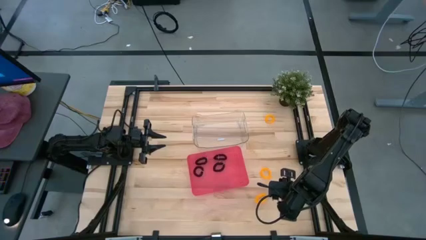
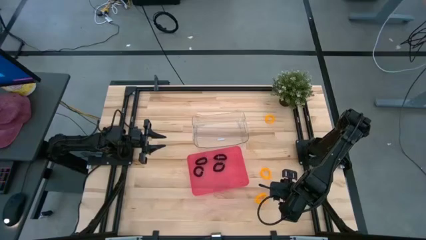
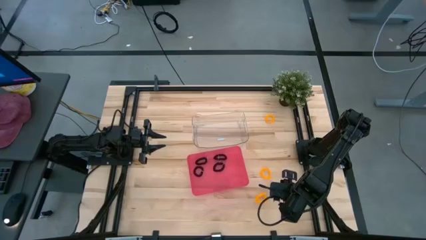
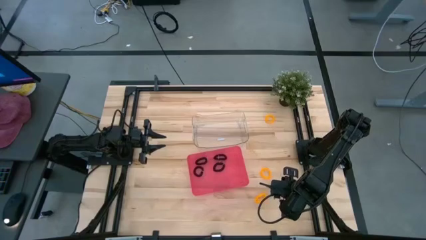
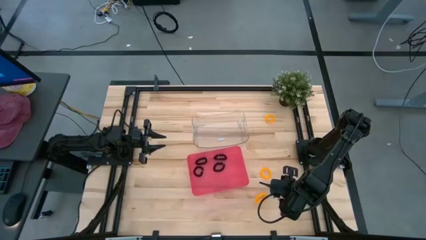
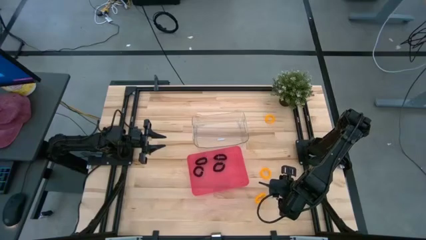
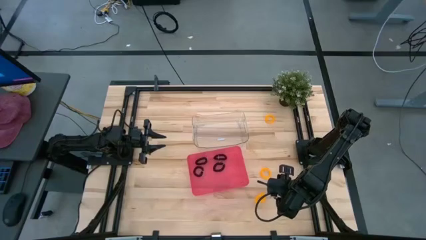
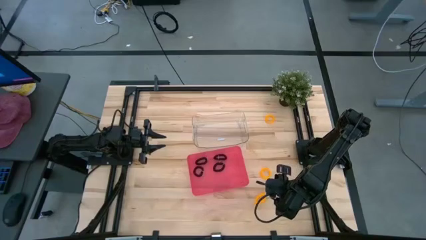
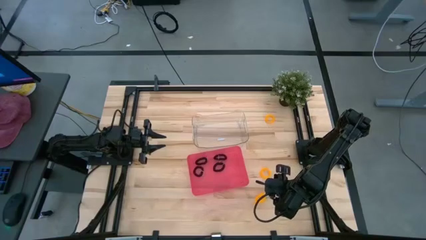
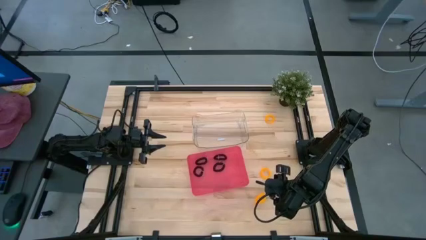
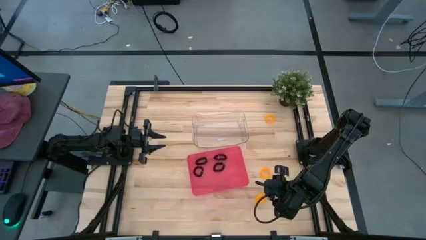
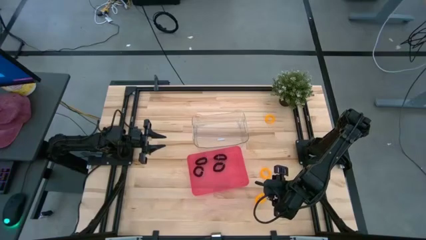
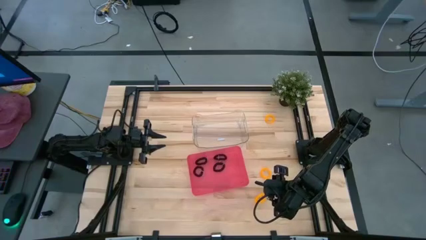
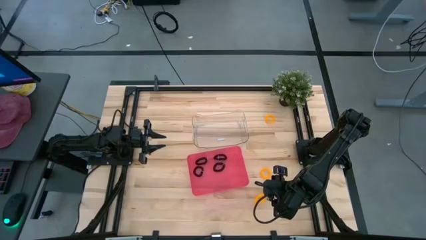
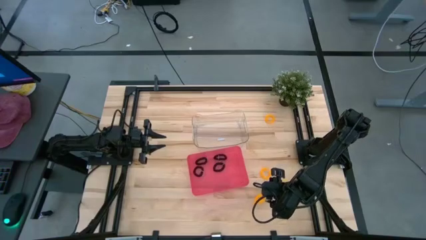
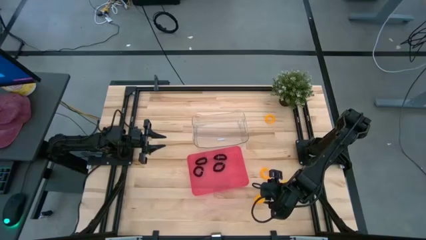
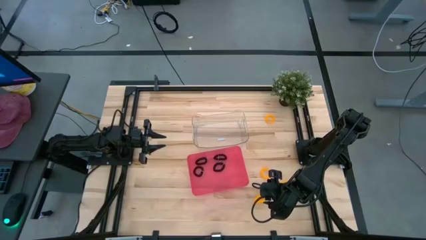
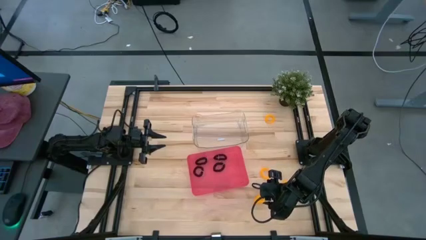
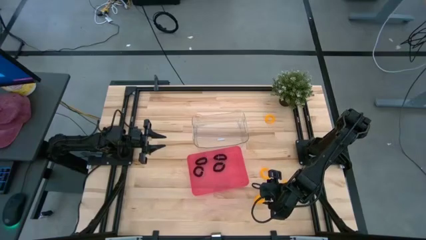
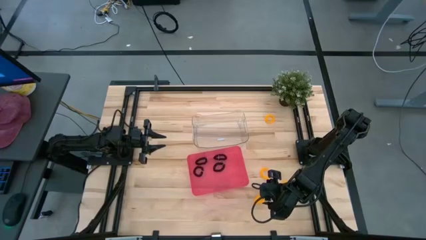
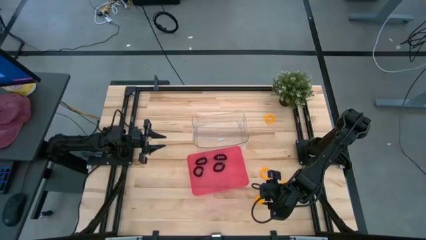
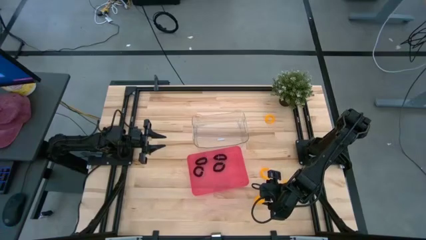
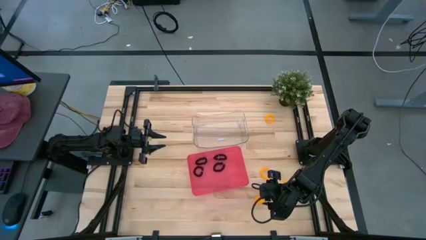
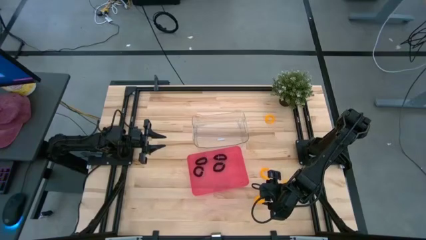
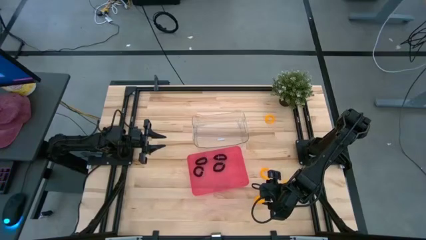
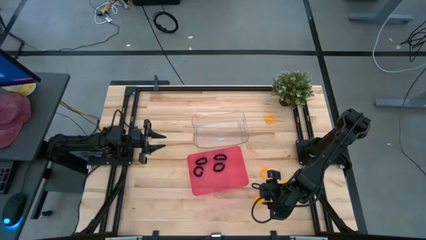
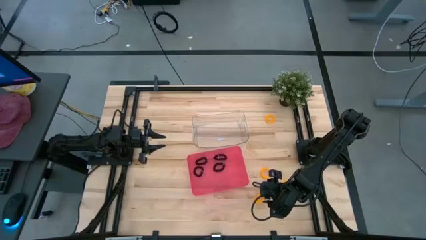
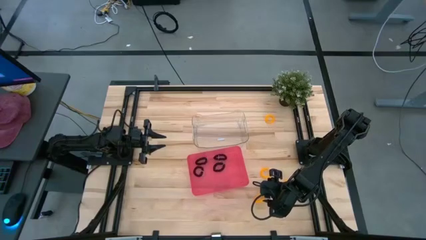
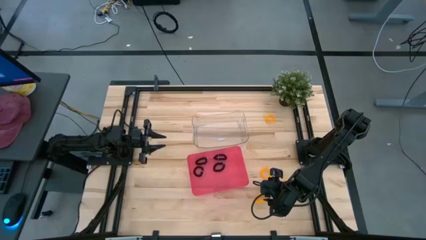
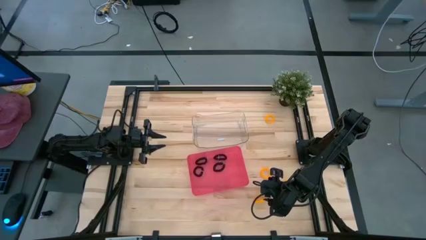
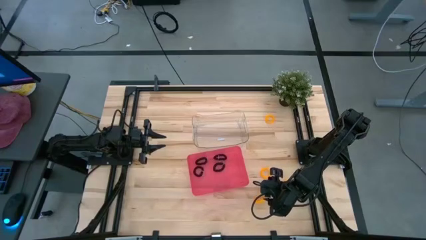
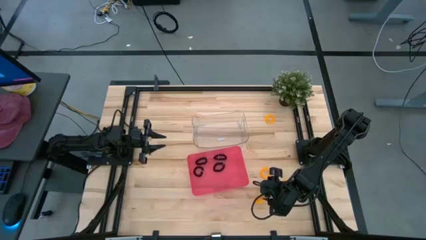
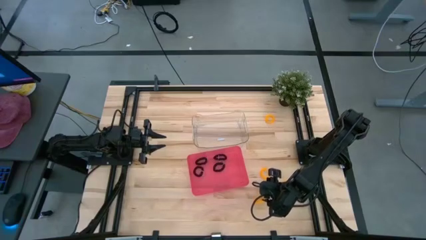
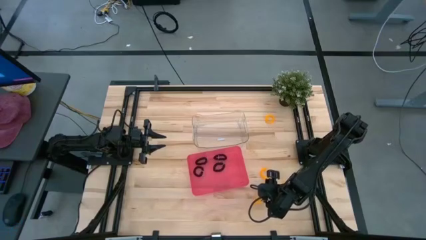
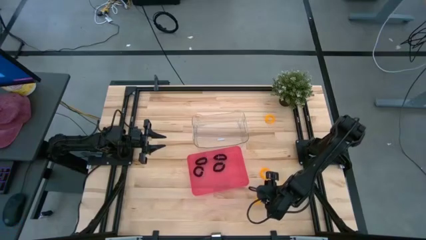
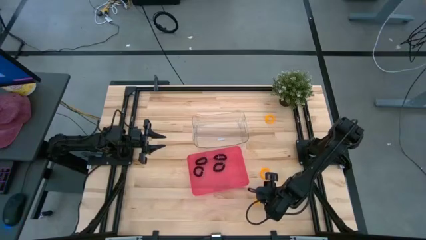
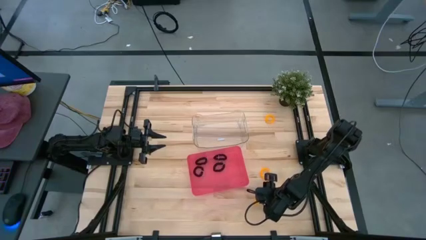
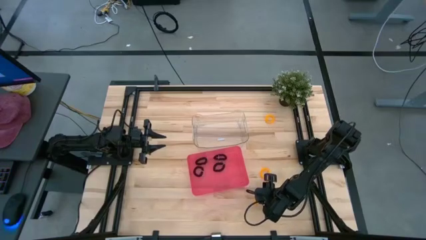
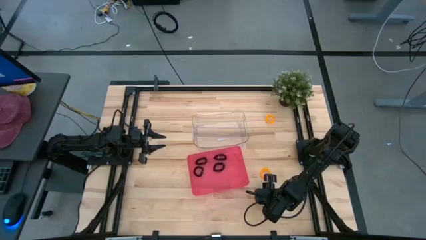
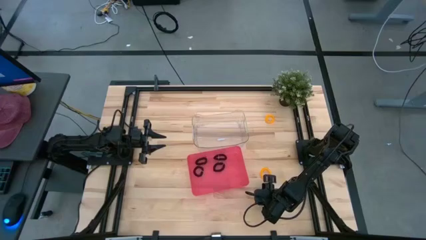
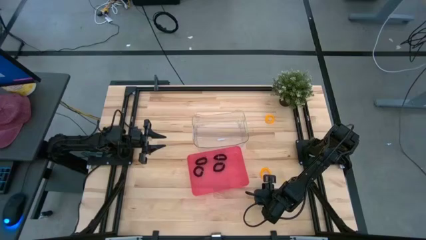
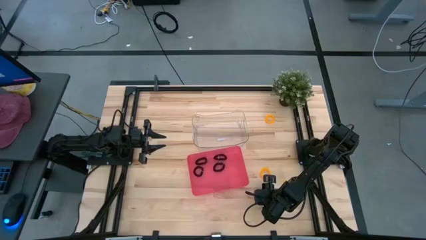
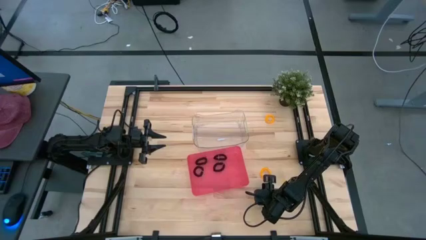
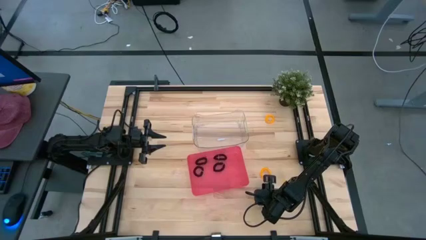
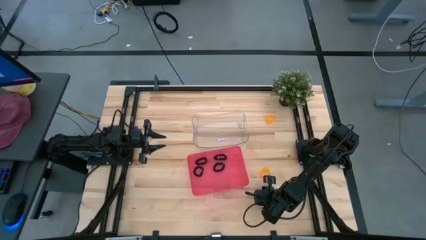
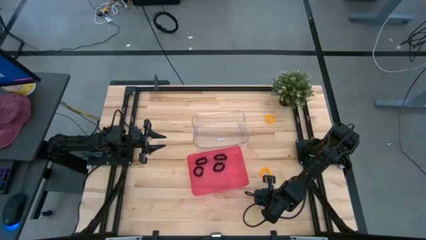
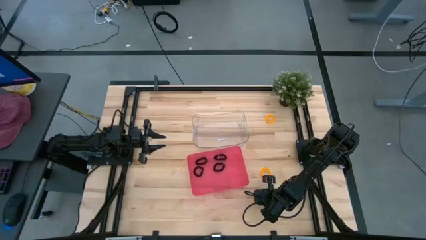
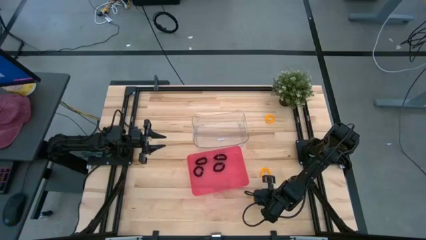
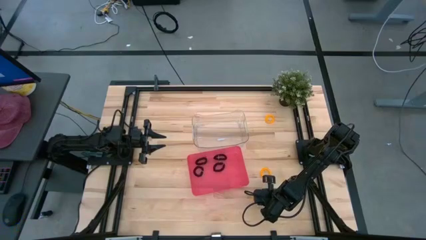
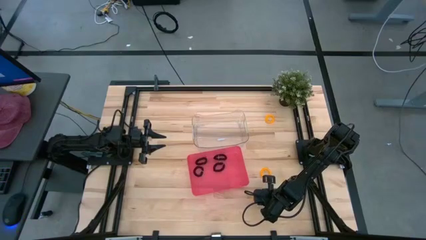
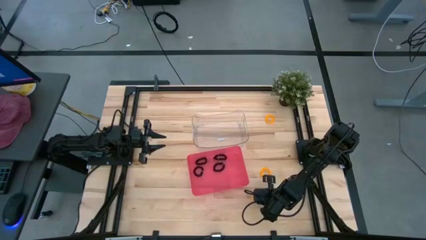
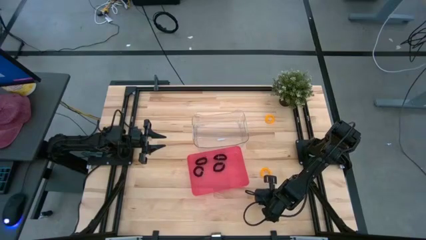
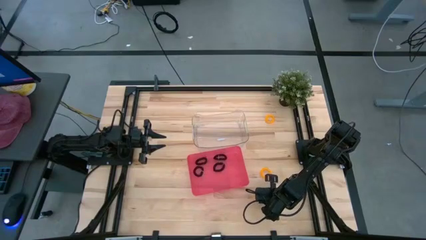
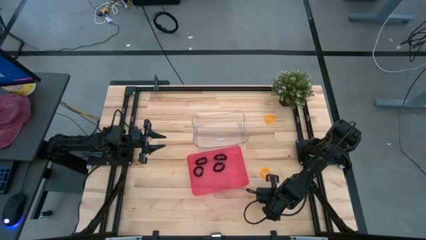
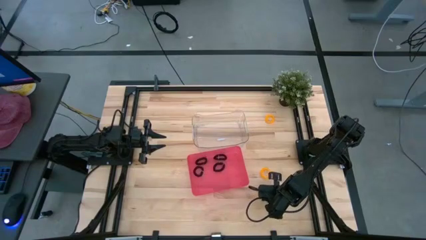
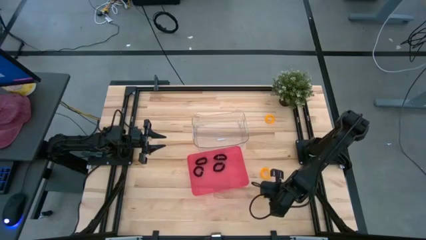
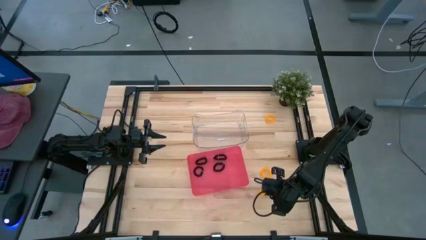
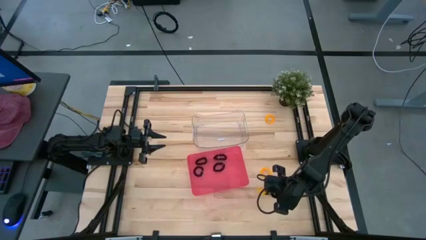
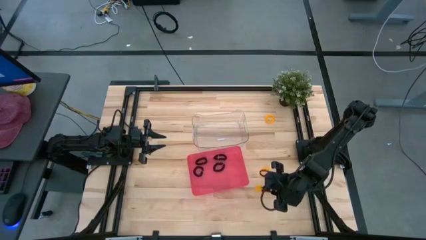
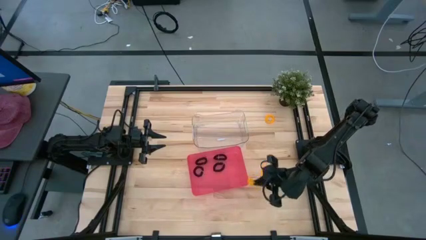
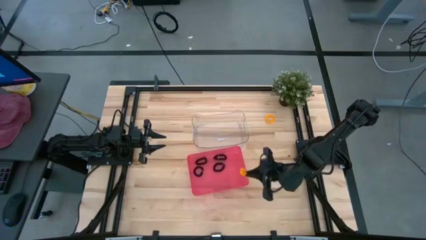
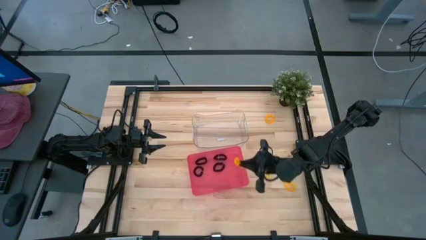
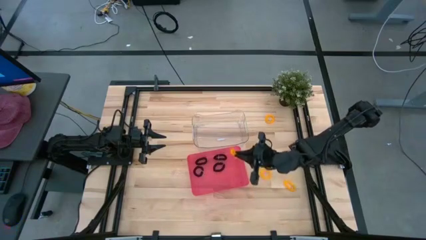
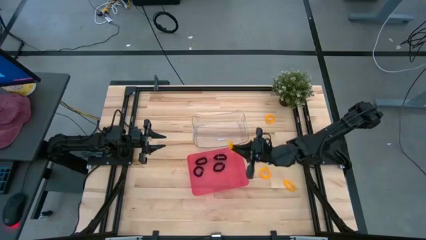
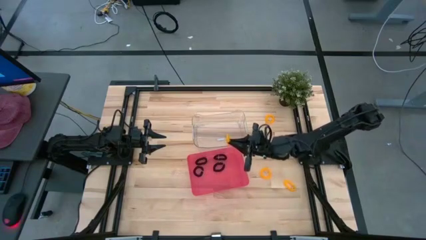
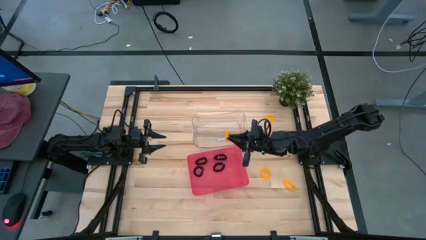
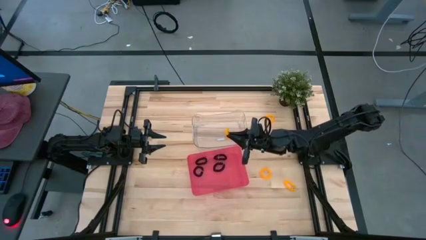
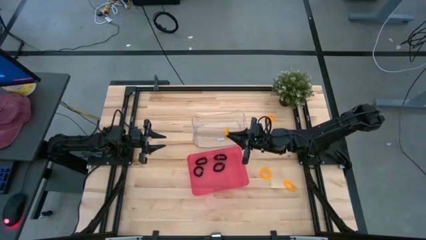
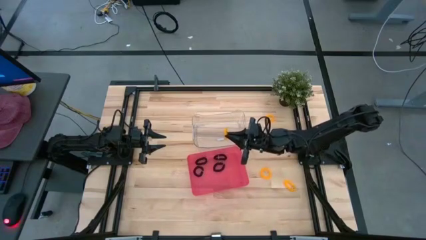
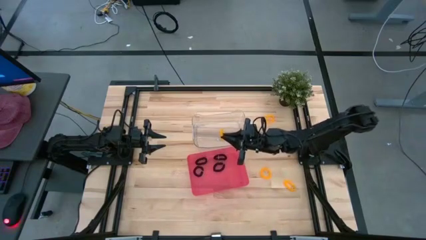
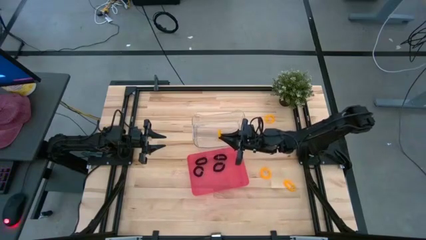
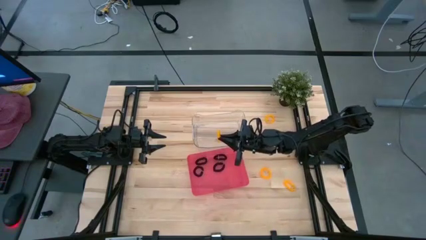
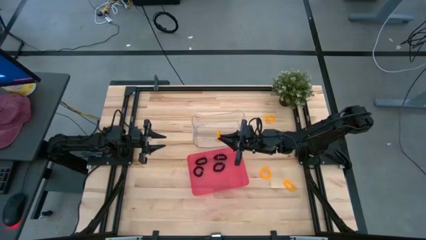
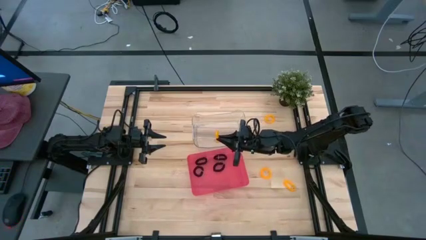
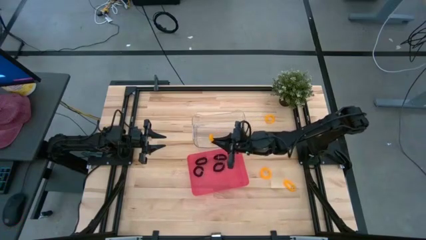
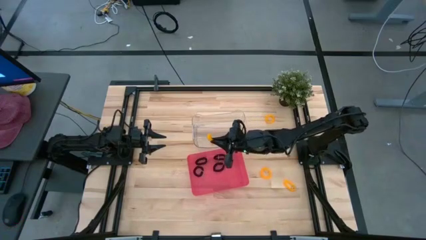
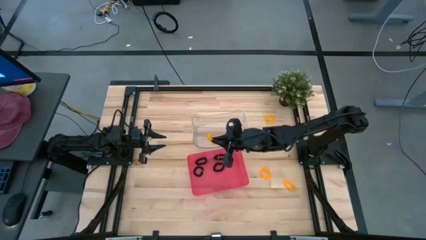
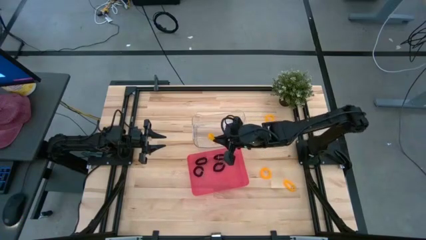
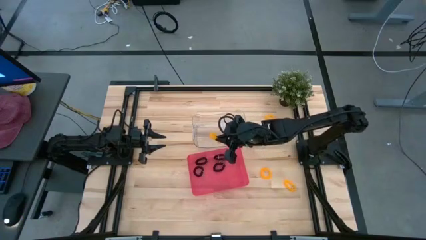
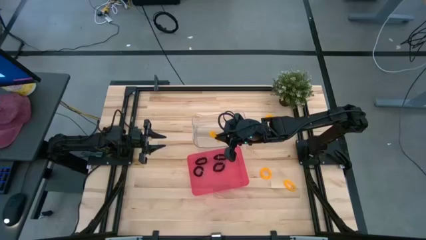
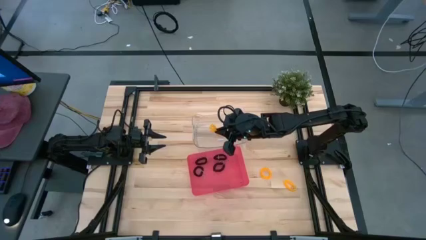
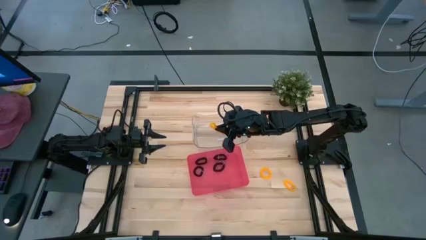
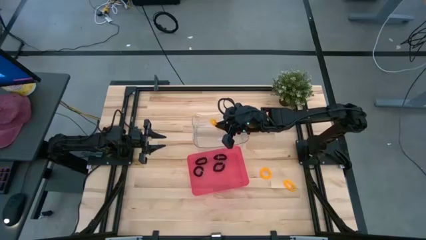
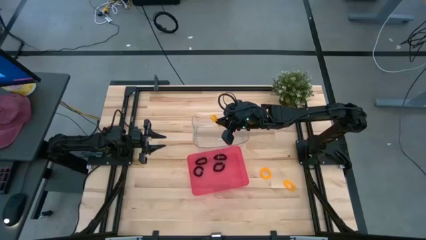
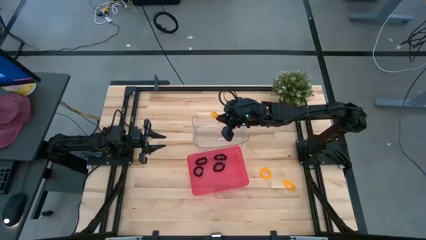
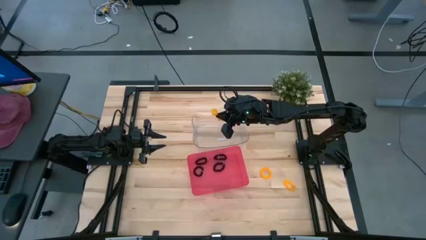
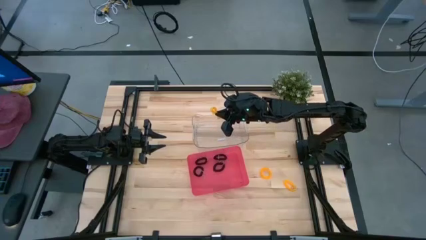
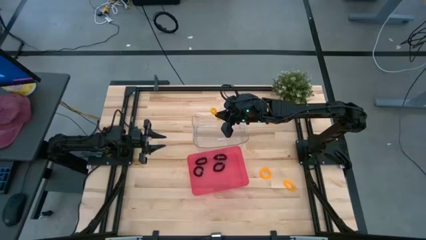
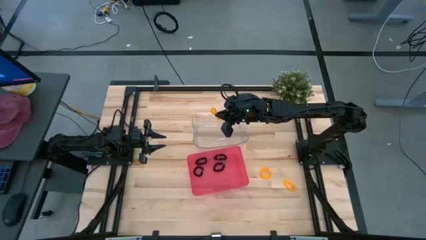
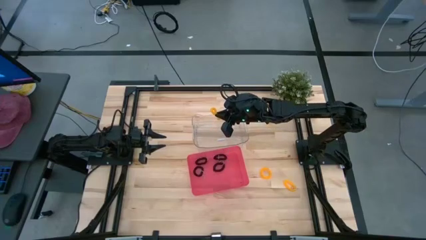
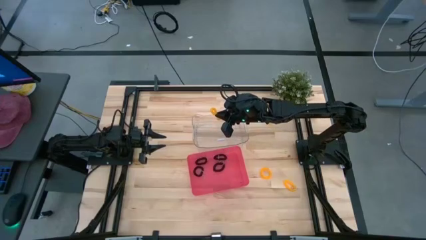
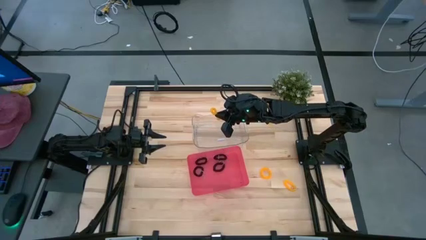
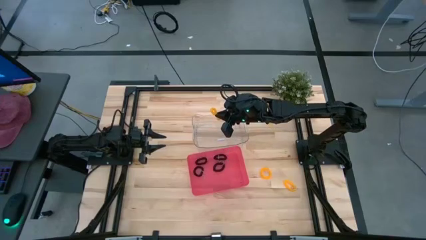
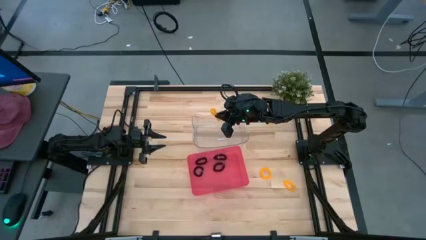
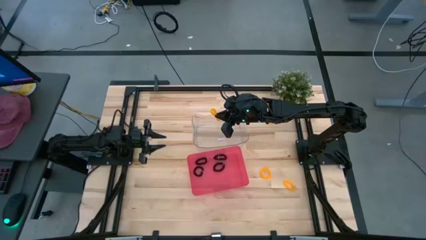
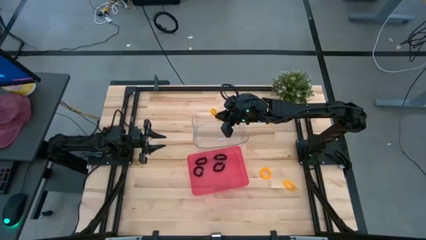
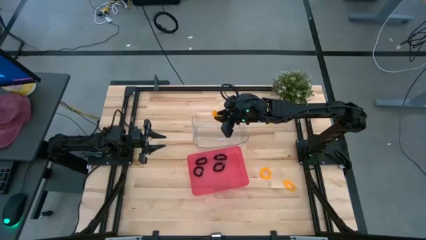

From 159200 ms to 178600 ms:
Task: Sort spring keychains
Put the yellow spring keychain into the transparent bin
